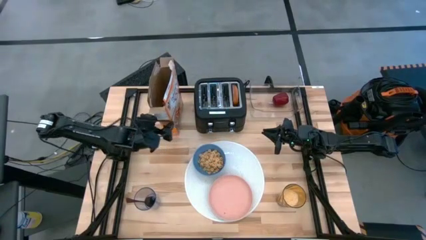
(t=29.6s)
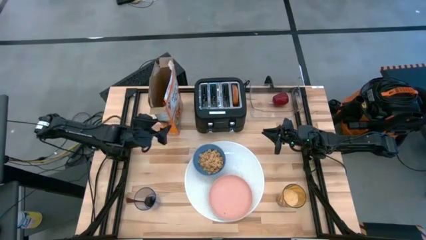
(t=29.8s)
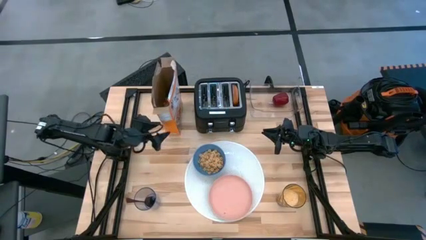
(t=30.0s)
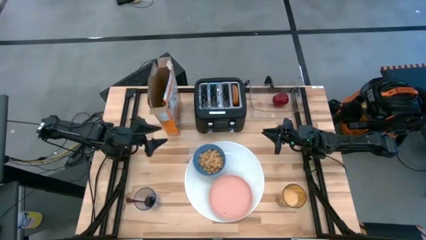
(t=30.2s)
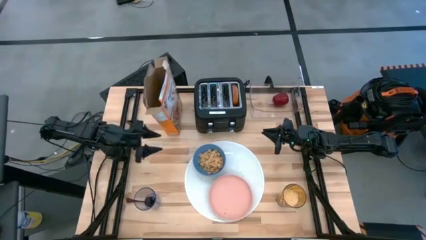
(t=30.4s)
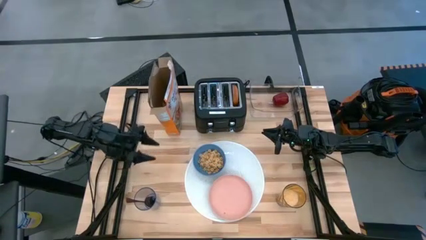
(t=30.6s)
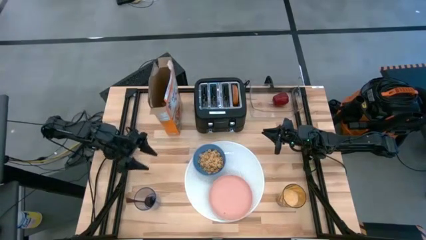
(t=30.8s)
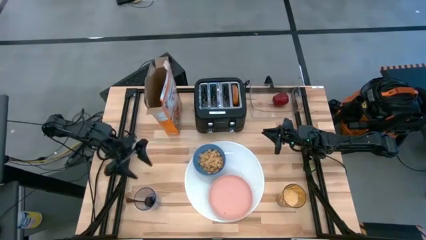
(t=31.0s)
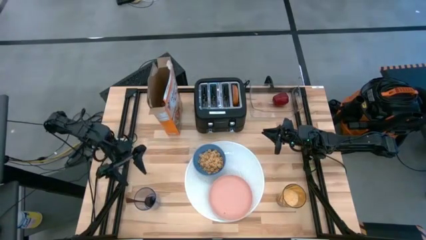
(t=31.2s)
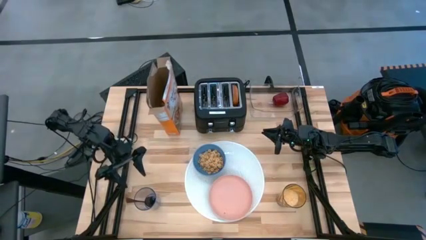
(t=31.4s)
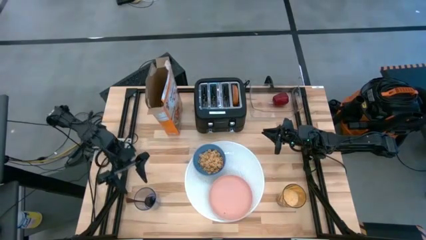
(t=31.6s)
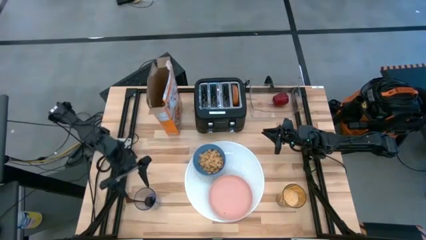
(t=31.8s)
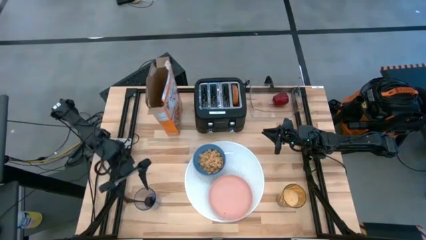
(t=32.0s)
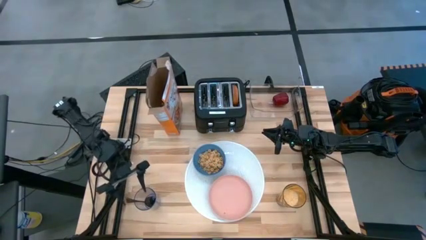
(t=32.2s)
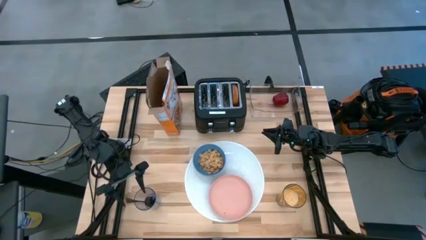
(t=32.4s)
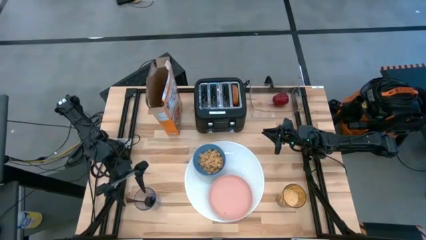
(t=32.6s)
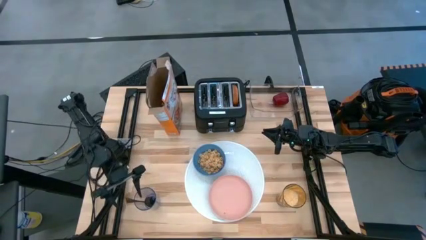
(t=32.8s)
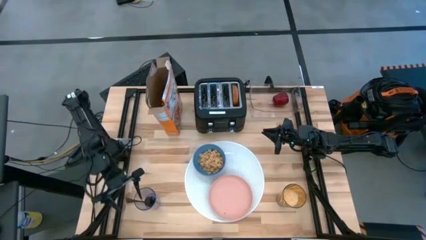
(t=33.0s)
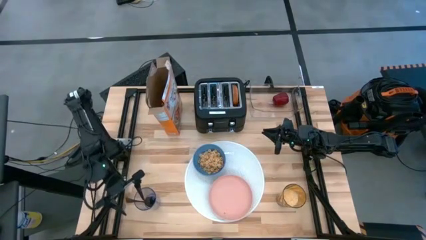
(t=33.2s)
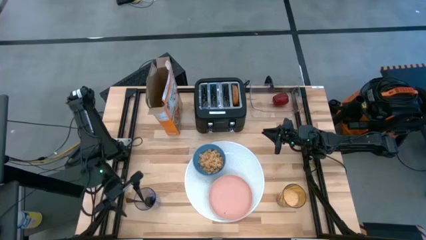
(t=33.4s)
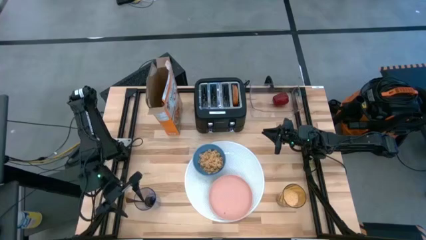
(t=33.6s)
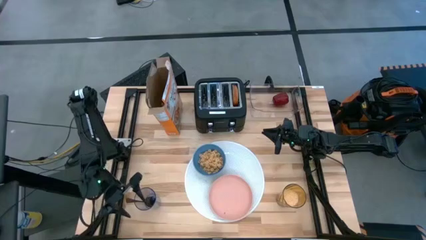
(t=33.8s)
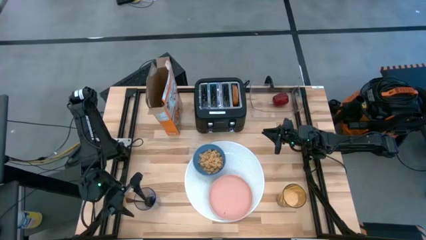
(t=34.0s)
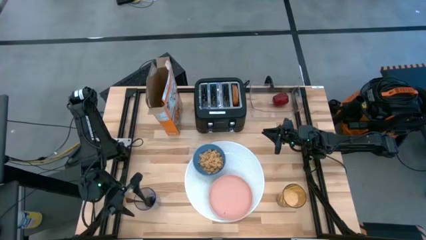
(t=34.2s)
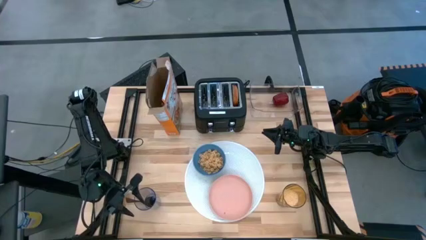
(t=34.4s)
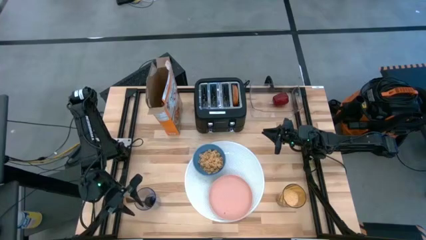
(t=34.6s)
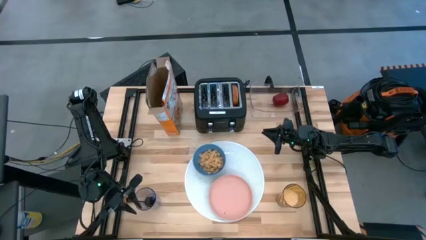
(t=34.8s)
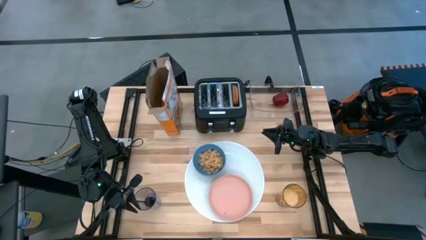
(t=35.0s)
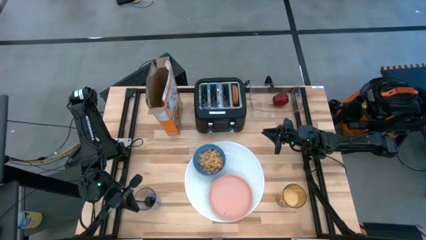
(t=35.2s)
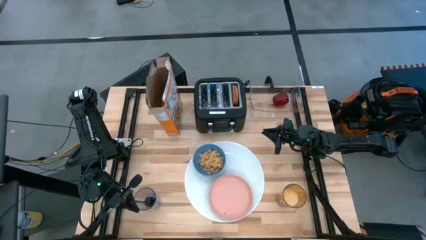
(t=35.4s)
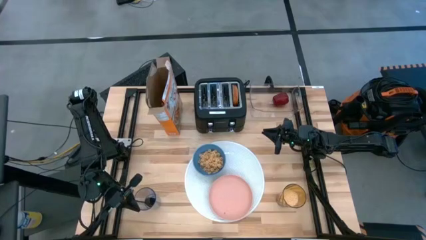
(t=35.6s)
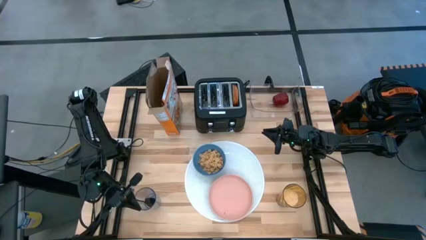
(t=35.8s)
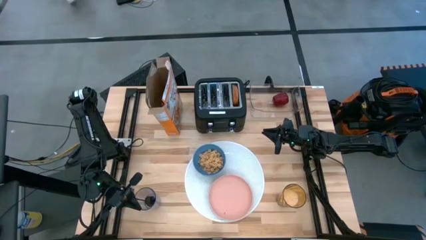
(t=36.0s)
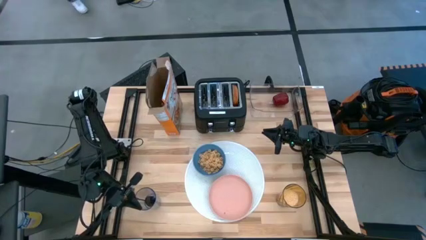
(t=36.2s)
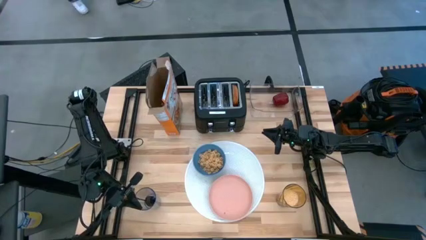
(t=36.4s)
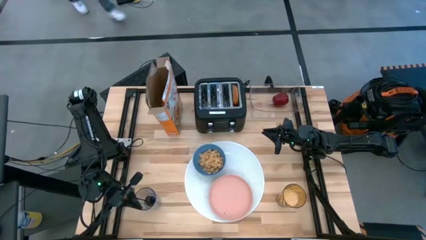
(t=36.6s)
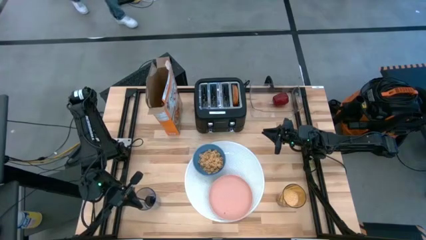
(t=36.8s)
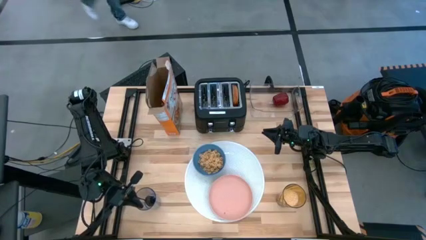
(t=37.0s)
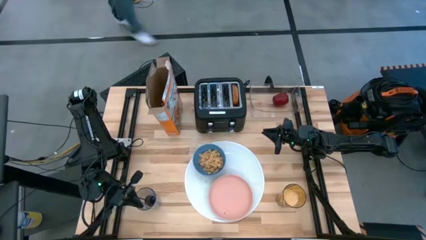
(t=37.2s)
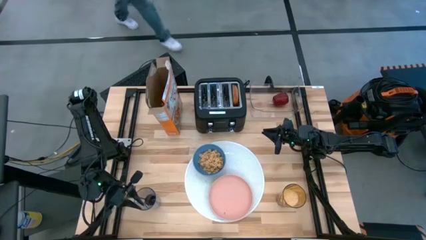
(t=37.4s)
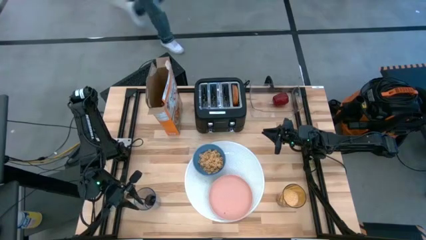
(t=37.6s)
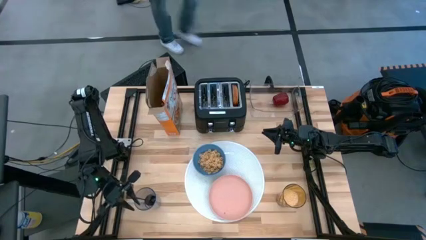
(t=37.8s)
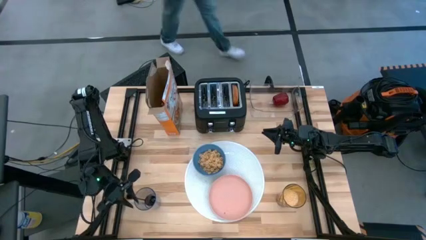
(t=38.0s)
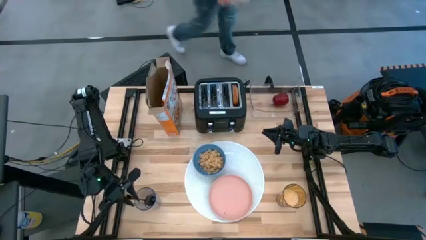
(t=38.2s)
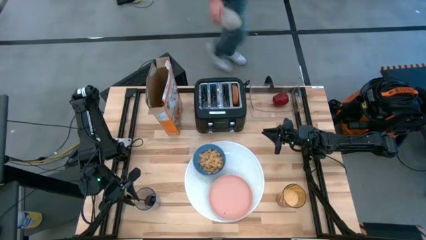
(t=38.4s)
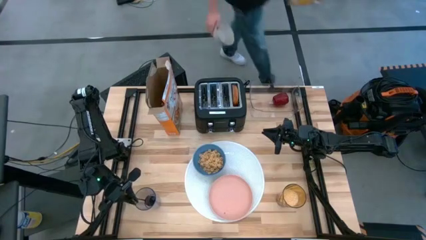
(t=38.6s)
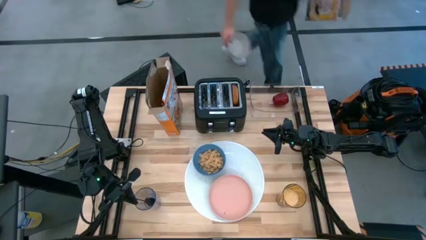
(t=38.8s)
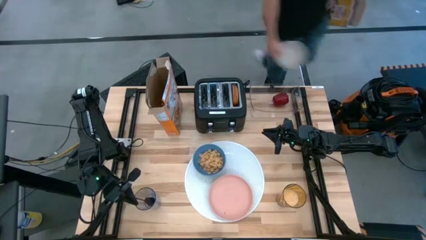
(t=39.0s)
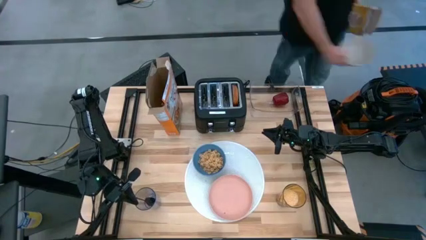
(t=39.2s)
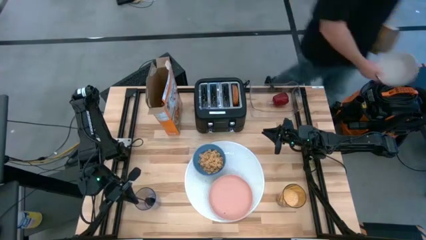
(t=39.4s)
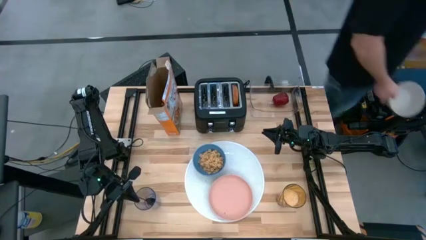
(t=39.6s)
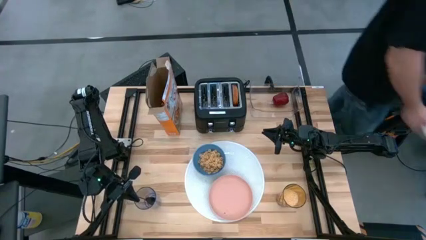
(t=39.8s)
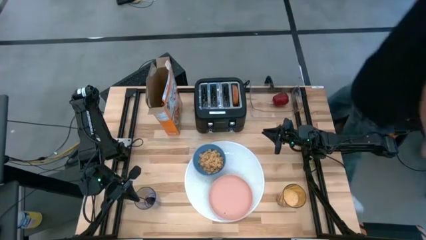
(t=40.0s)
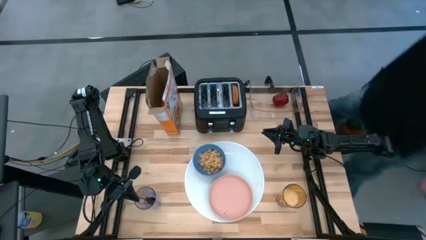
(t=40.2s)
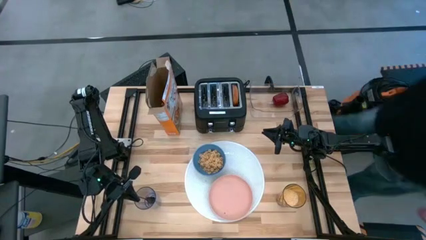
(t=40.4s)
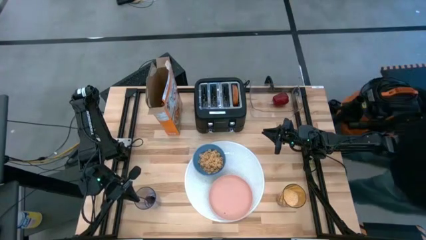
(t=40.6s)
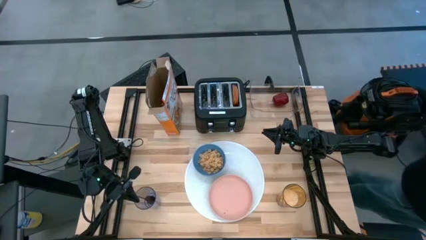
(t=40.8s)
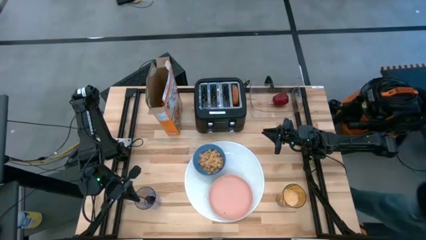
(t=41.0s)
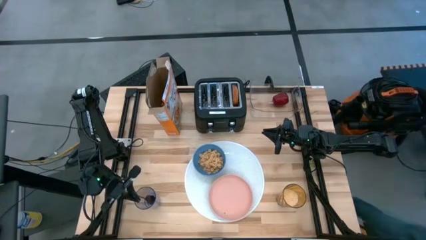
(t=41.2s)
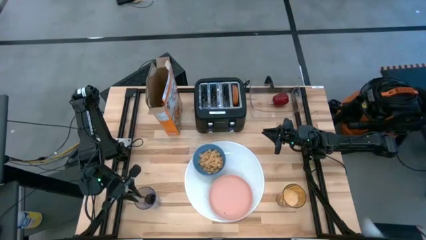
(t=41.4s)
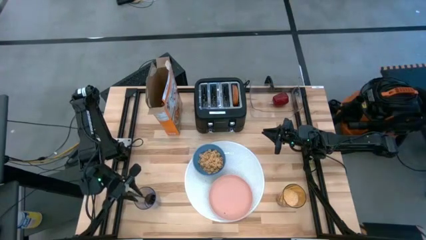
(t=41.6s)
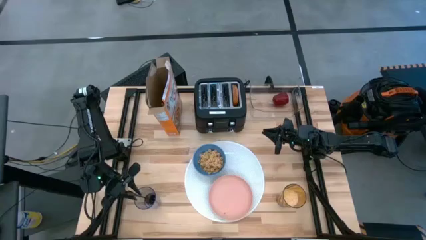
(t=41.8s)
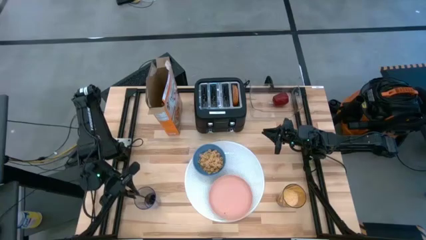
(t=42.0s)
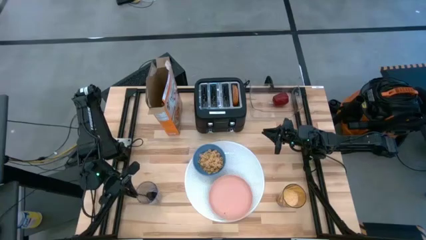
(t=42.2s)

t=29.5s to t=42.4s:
Task: Arrange a breakfast setting
Put the black spoon on the table mat

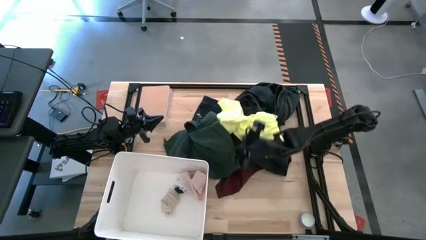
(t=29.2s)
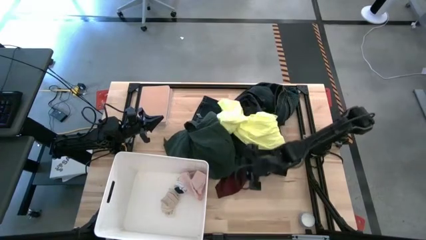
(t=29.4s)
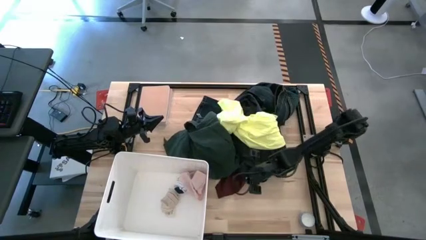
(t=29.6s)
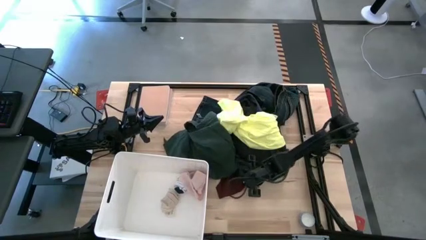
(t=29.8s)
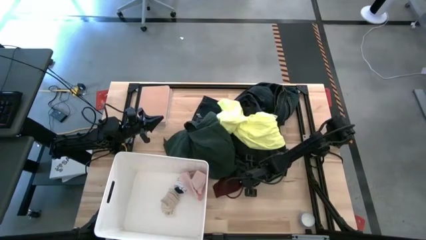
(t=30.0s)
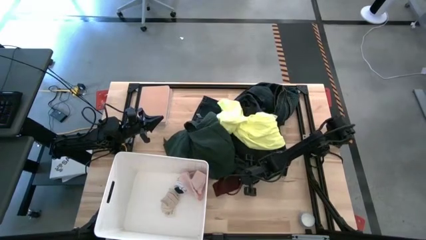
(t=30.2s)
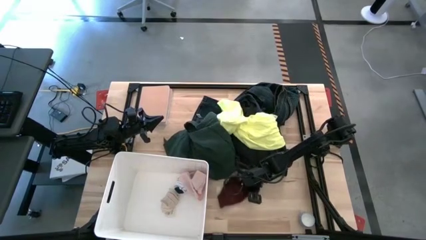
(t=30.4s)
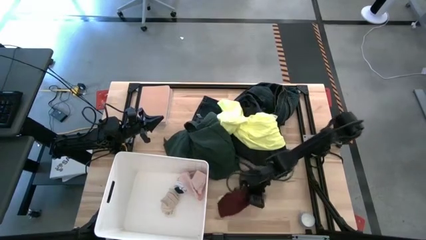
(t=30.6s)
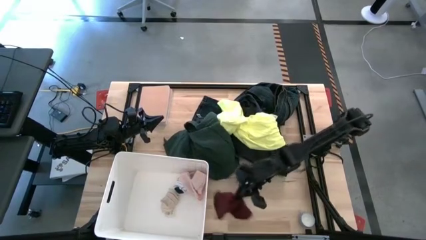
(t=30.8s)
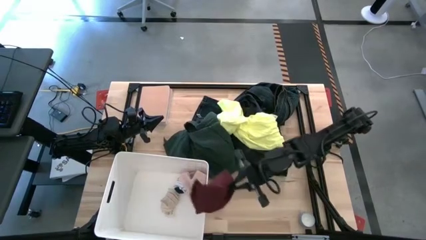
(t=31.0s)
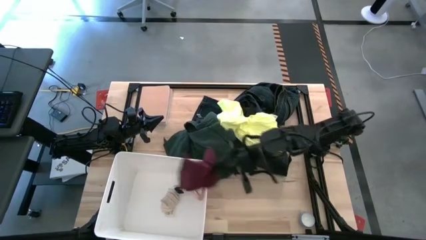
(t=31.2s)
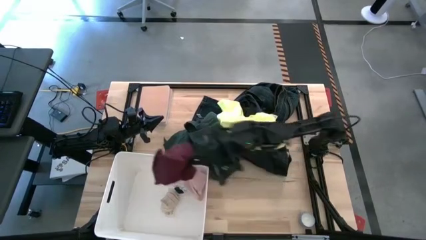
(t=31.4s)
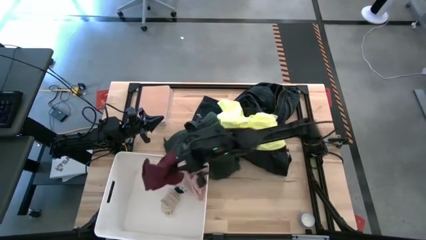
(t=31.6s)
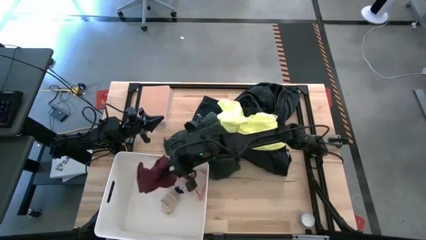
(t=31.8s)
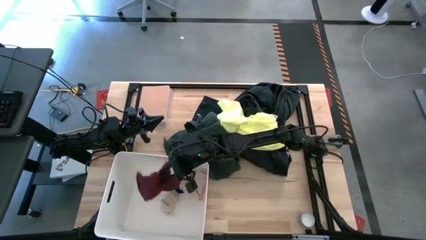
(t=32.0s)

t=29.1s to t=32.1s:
Task: Sort clothes
Put the maroon underwear into the white bin
